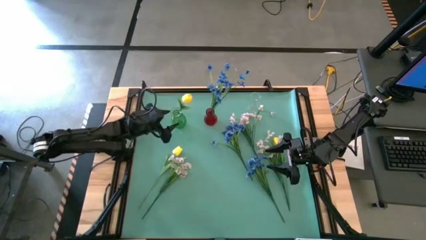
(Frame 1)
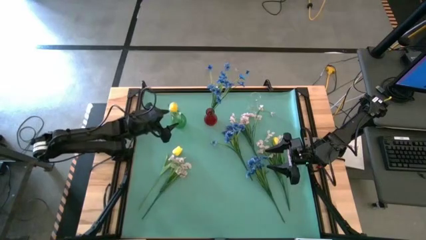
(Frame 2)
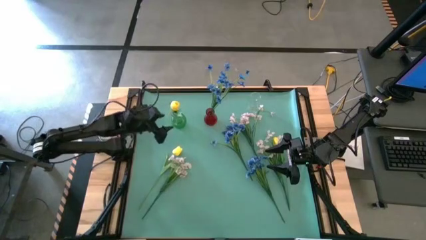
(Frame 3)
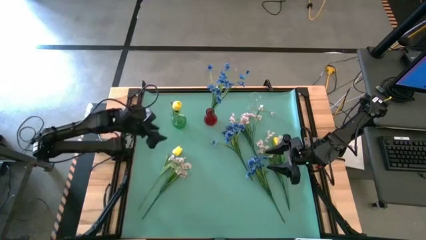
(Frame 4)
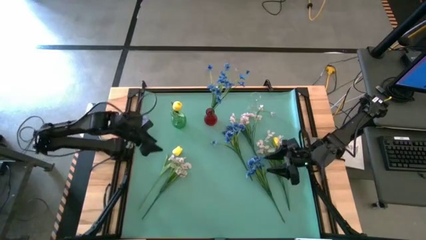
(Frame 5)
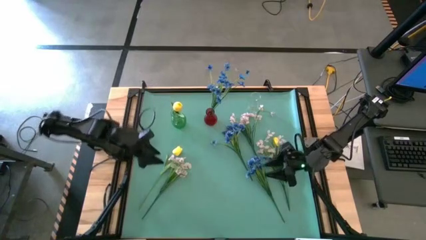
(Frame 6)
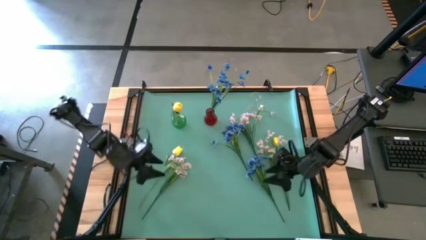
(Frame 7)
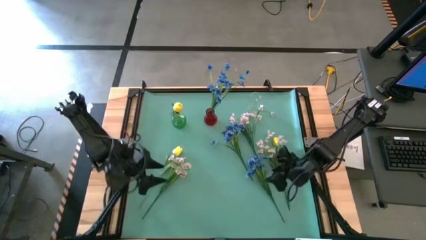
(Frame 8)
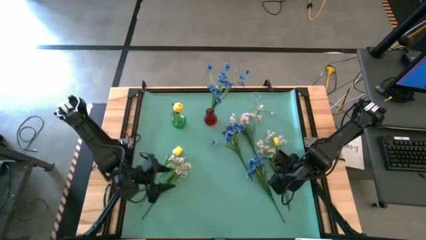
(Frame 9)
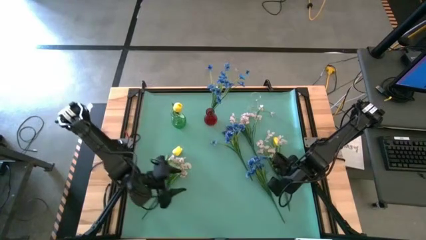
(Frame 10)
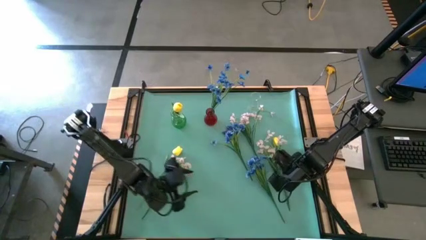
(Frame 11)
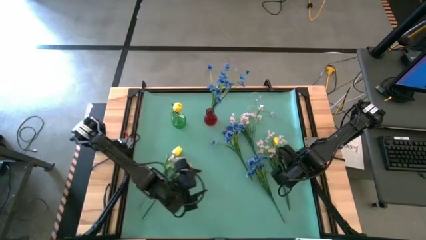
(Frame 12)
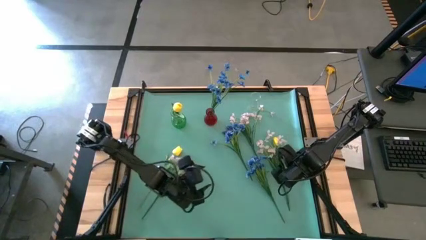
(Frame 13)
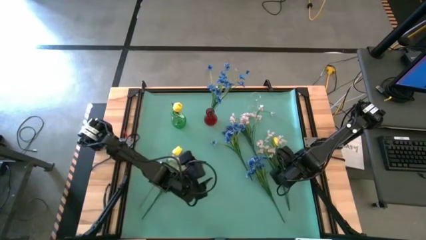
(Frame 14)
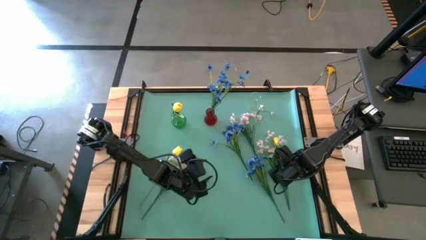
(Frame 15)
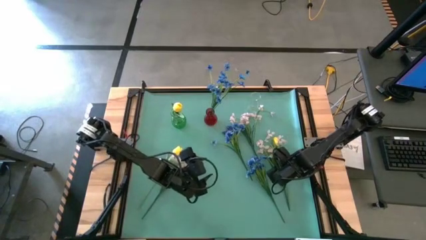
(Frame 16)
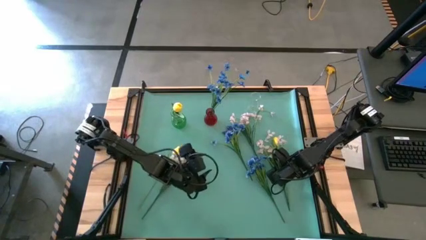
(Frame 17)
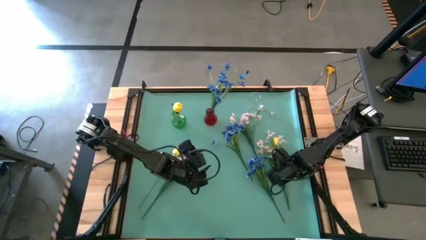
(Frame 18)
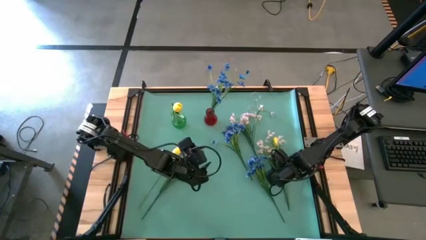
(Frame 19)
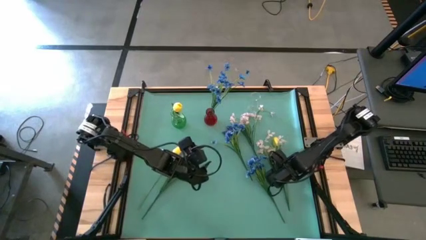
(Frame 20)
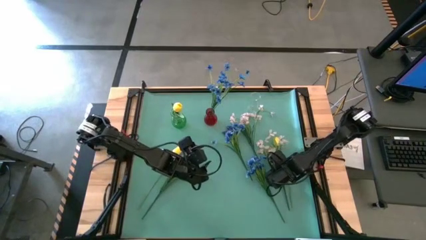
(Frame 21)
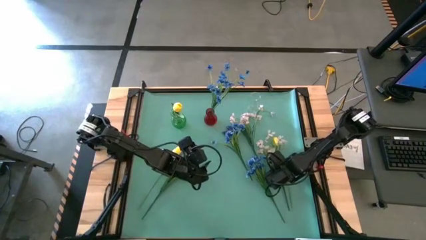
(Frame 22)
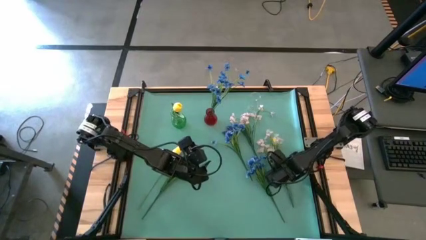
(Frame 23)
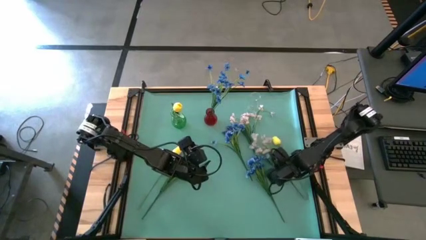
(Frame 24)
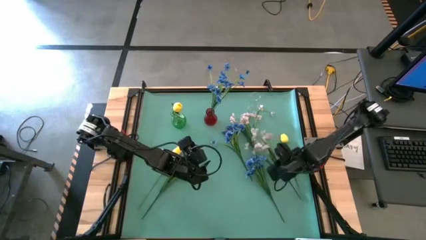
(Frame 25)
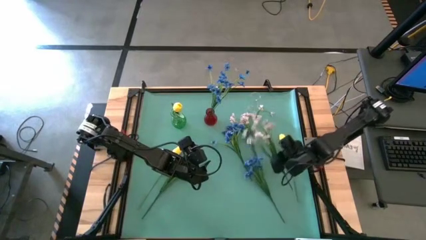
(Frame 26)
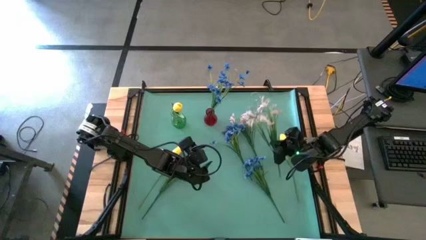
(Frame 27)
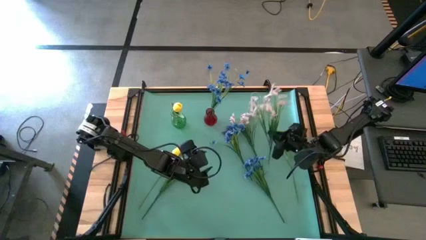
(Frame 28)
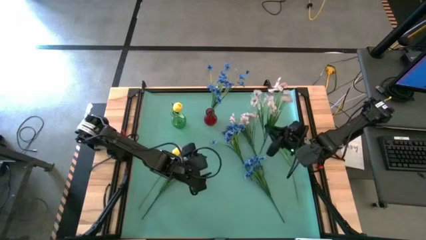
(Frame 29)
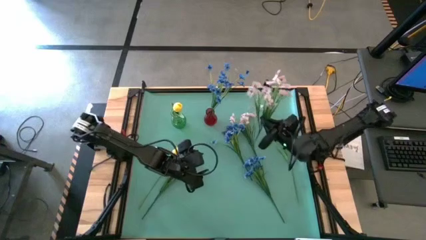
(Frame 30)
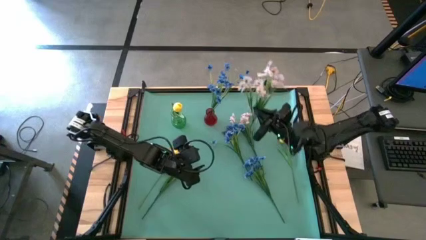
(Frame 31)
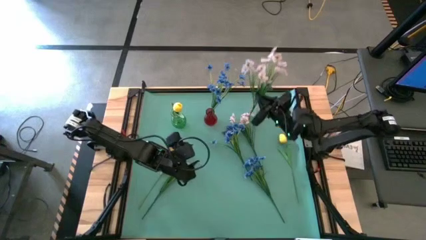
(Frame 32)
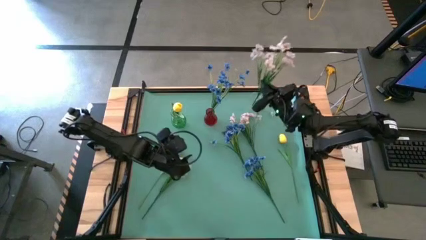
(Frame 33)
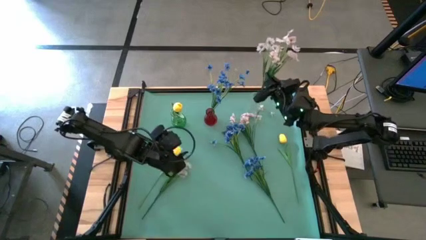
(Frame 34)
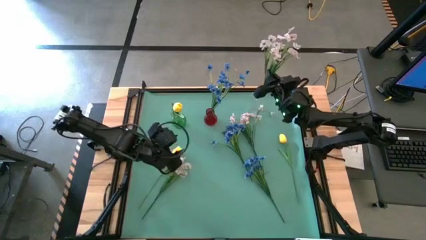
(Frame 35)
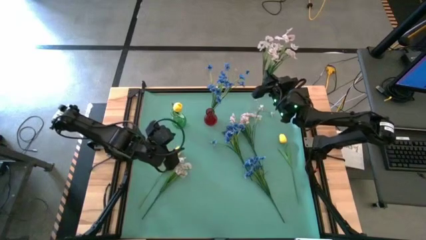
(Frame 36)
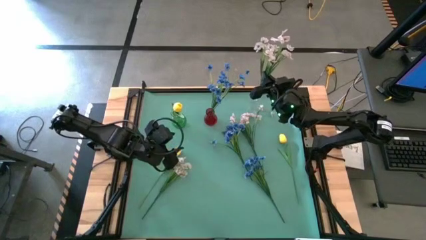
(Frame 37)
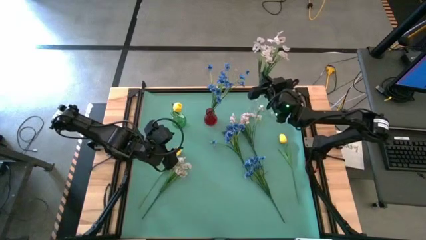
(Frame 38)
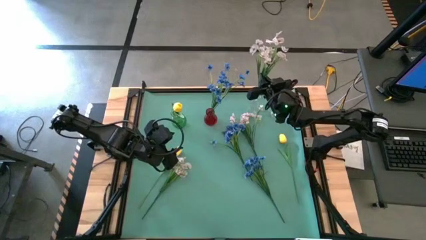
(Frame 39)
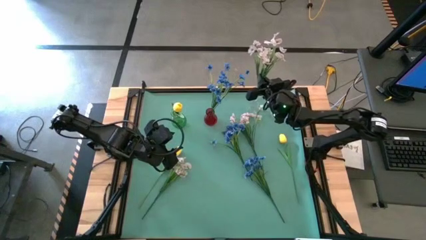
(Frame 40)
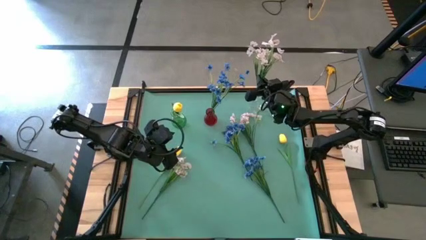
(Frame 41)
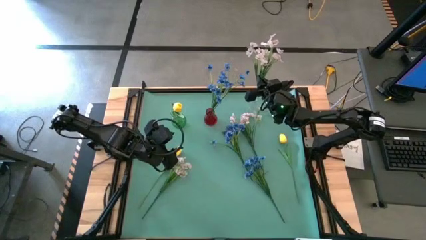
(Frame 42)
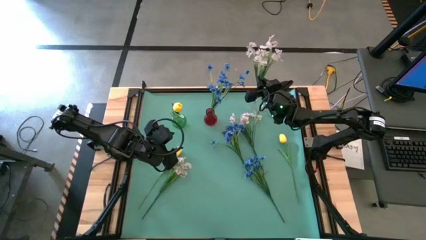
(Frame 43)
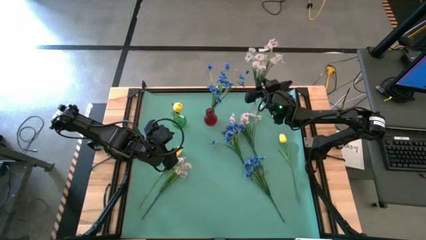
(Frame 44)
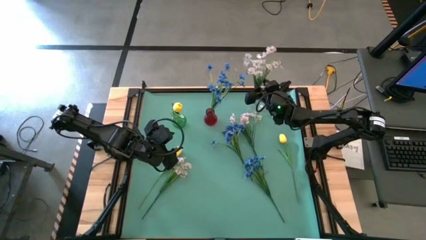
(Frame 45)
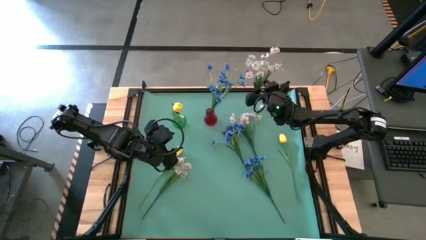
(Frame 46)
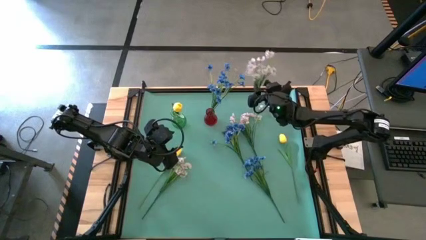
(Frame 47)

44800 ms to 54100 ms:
Task: Sort flowers into vase by color
Put the bottom right white flower into the transparent vase

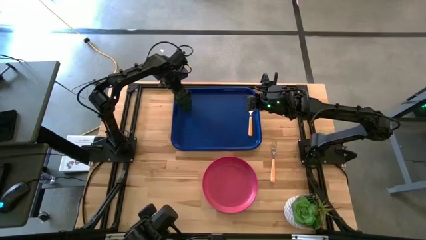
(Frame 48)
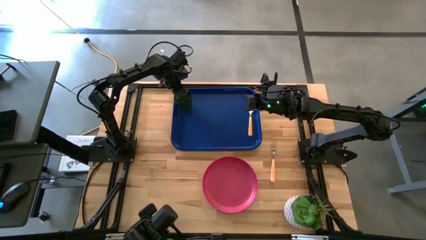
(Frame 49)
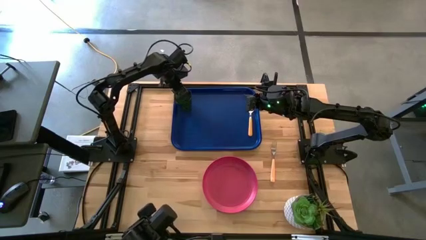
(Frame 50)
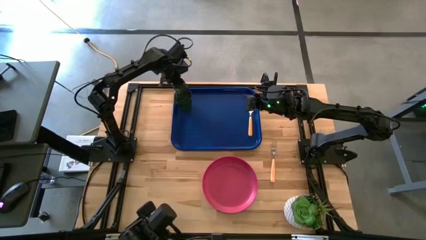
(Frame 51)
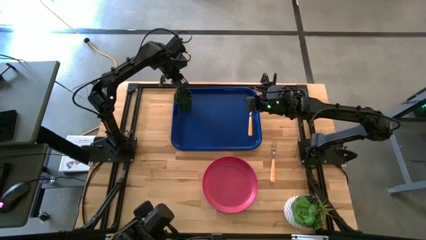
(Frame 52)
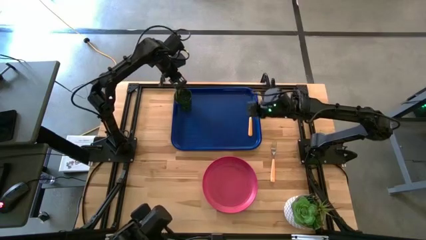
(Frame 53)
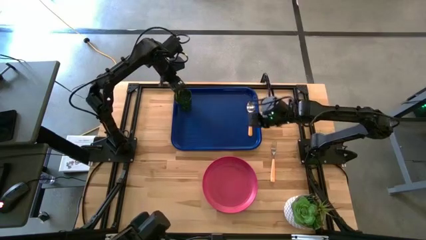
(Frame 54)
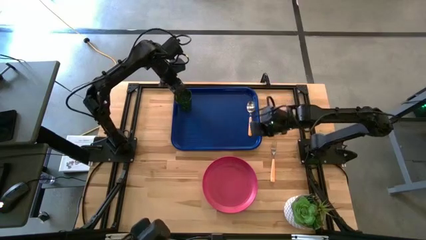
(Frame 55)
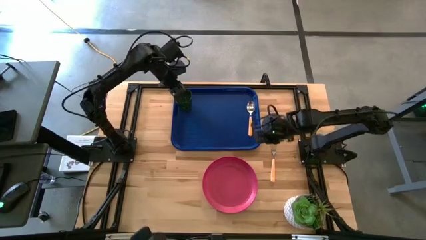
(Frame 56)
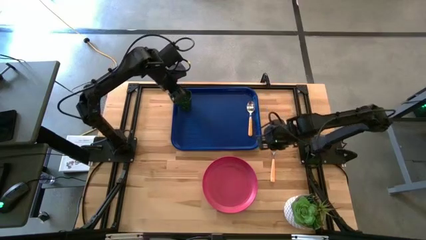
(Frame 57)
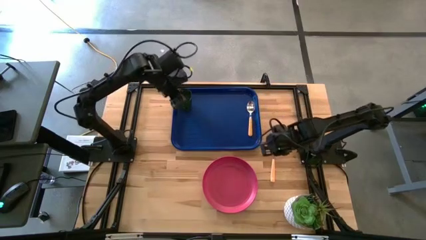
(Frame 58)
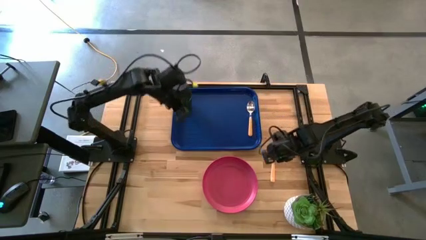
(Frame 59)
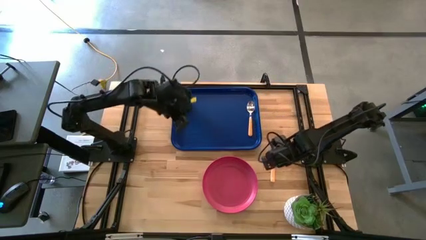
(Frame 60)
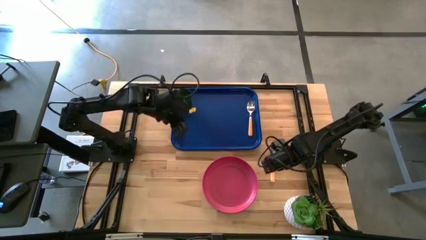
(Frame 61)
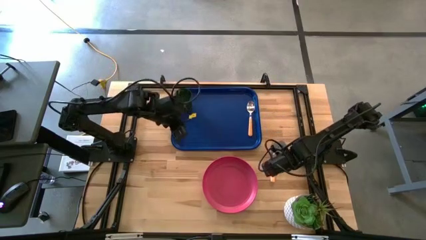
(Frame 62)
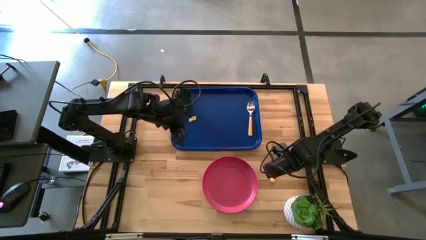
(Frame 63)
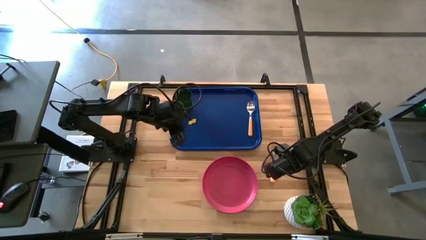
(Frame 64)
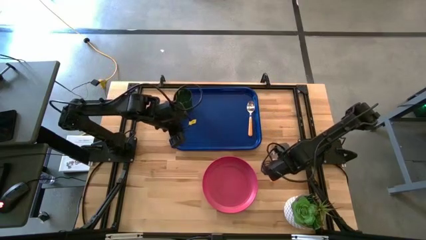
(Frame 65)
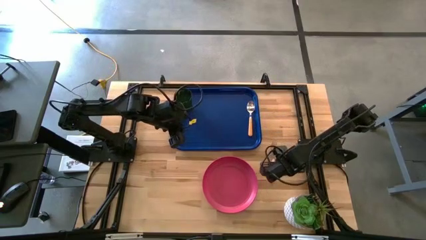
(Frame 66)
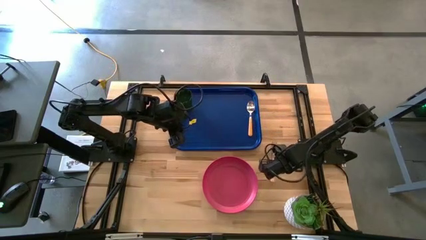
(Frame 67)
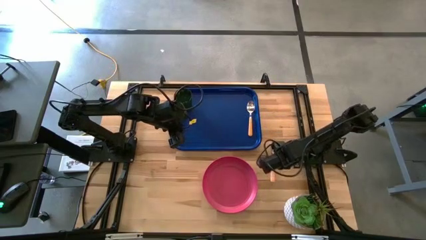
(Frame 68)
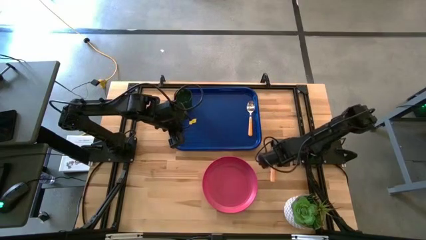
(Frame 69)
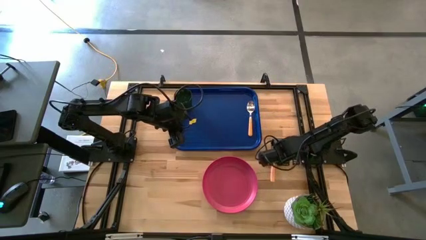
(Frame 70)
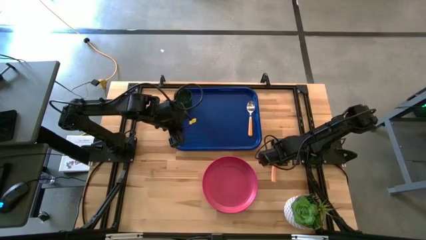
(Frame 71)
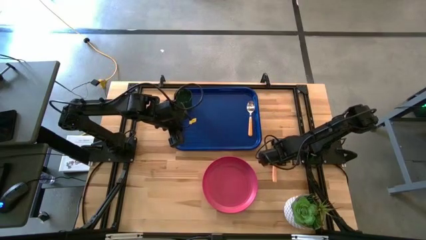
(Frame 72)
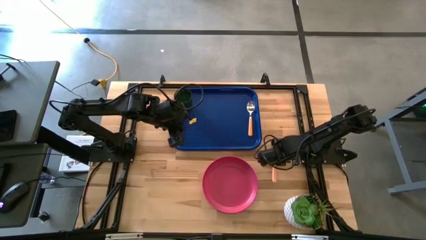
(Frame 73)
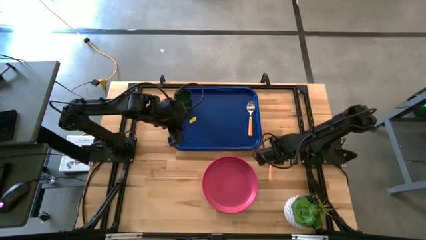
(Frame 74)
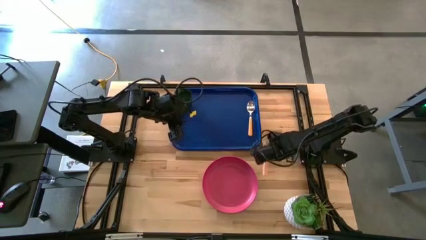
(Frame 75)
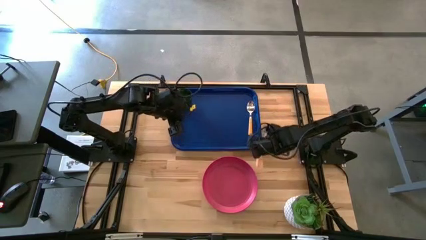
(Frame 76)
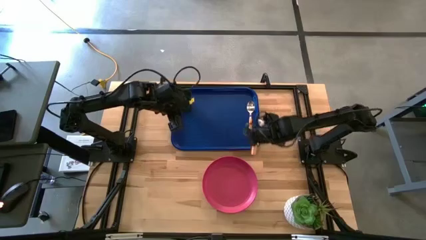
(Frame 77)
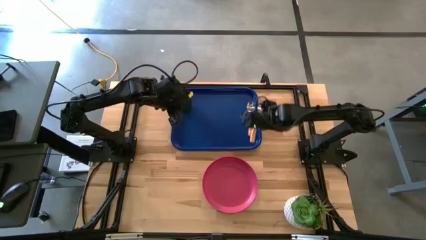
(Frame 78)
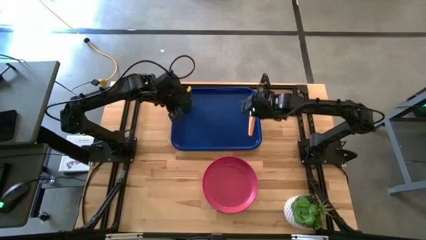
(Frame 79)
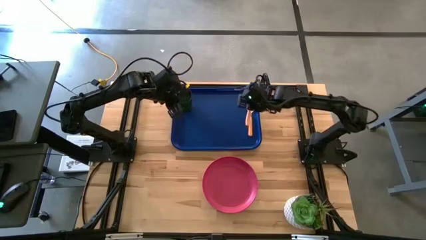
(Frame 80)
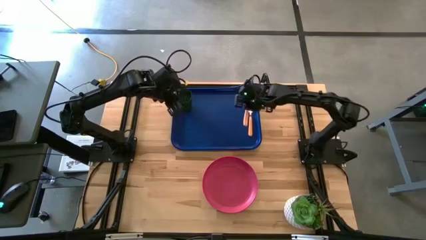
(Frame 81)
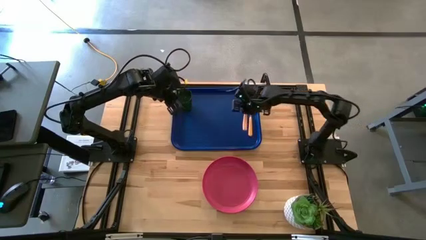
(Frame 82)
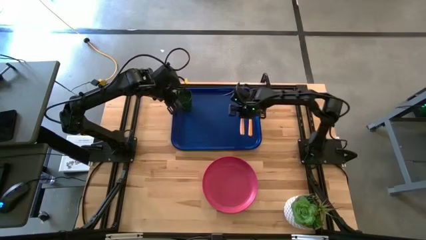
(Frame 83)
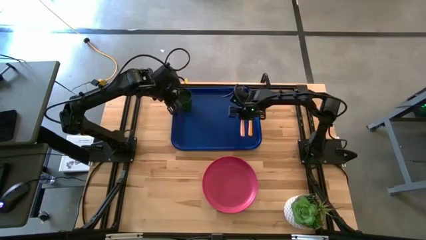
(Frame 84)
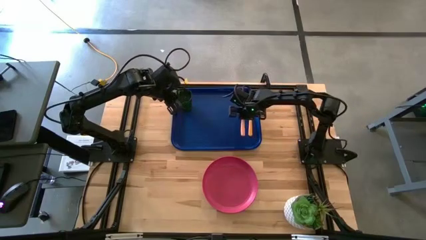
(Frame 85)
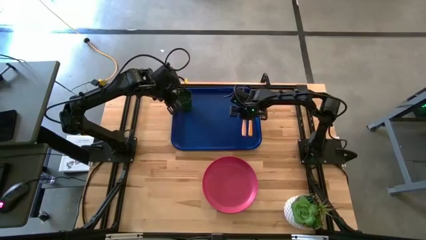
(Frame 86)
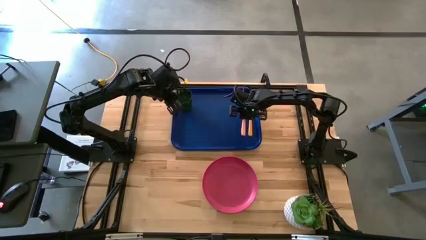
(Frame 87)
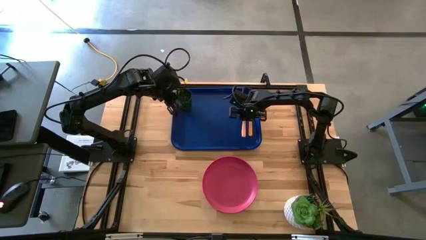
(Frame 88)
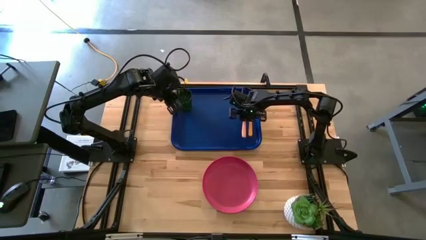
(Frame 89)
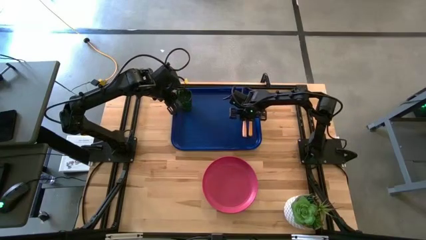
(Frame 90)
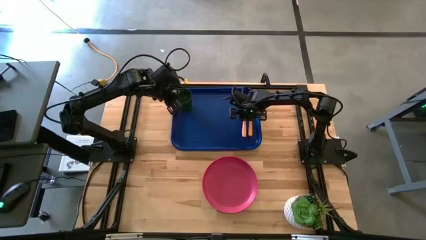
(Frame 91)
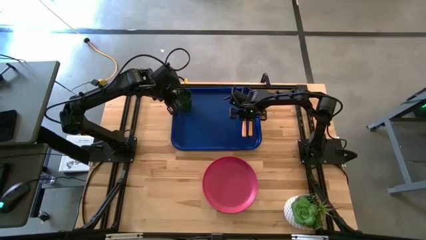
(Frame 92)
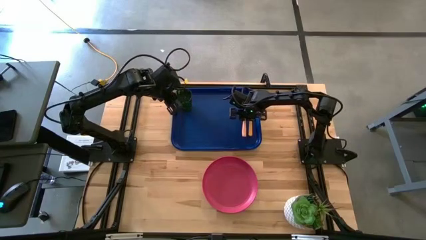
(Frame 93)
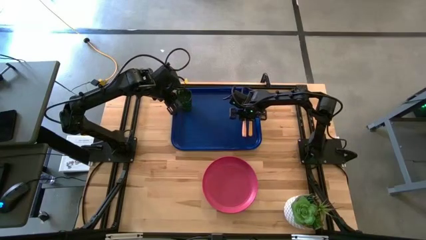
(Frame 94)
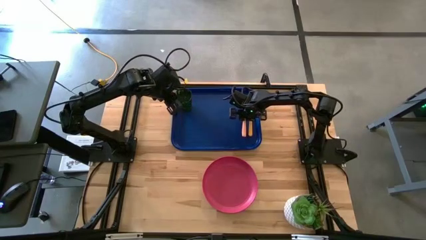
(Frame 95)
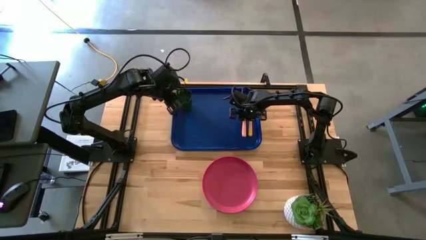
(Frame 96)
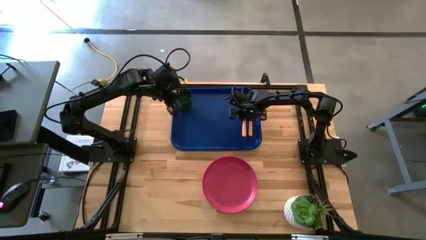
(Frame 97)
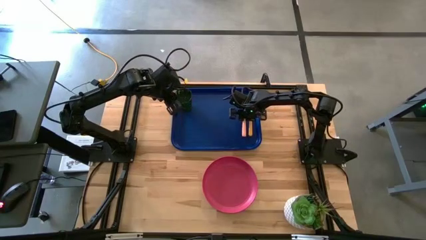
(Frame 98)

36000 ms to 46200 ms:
Task: Pick and place plate/cup/fork/spoon on tray
Put the brown fork on the blue tray on the left of the brown spoon
